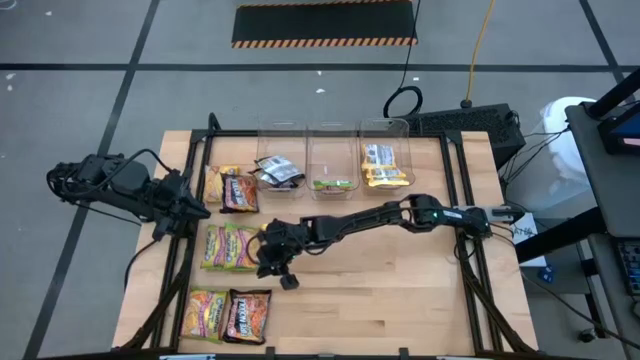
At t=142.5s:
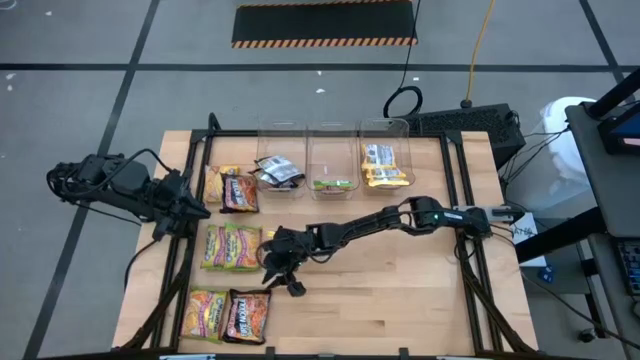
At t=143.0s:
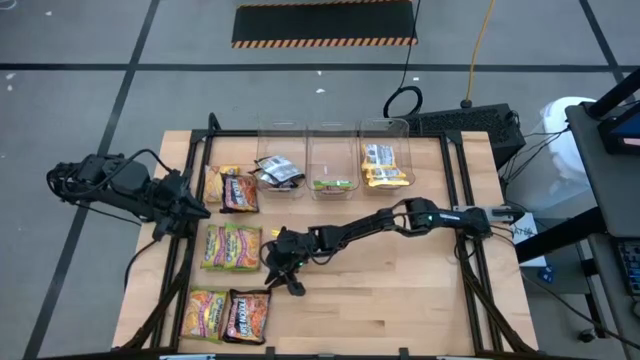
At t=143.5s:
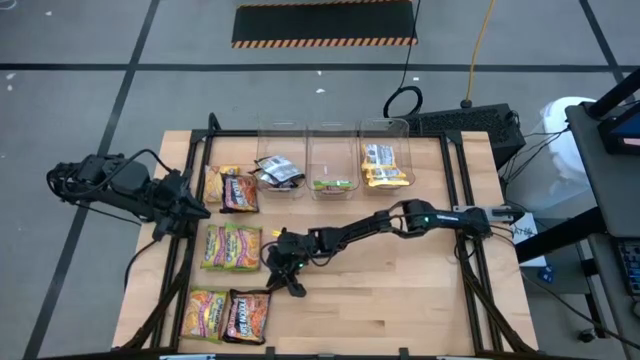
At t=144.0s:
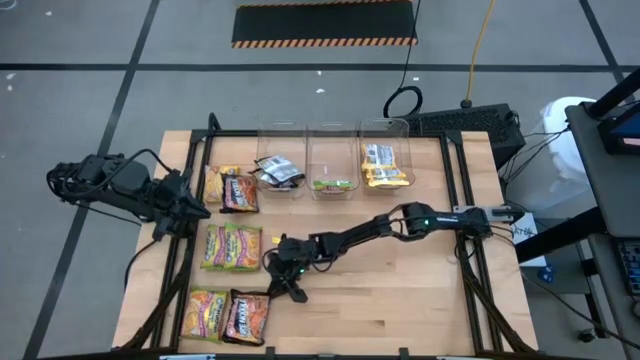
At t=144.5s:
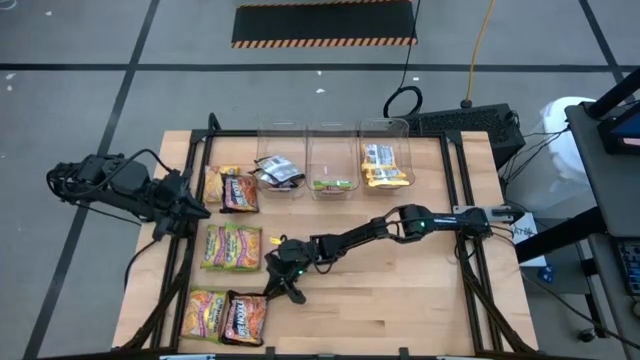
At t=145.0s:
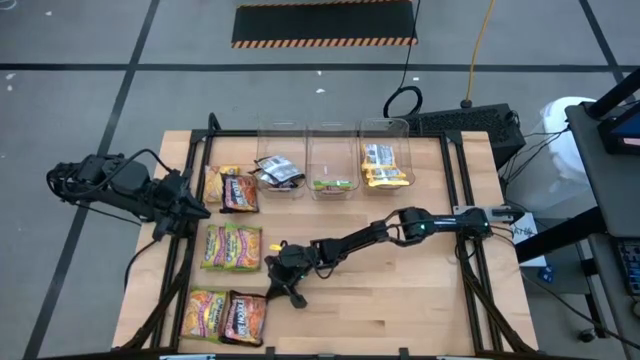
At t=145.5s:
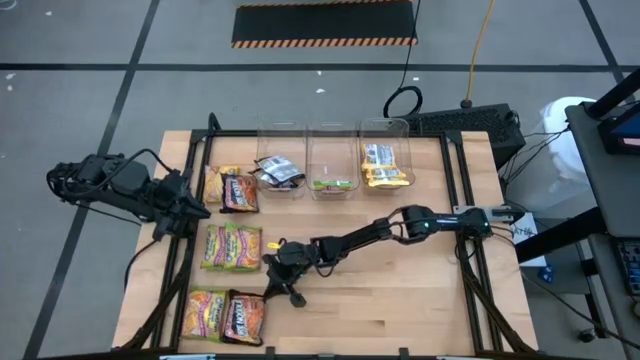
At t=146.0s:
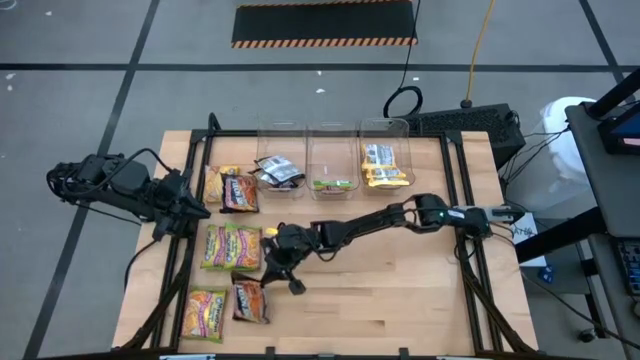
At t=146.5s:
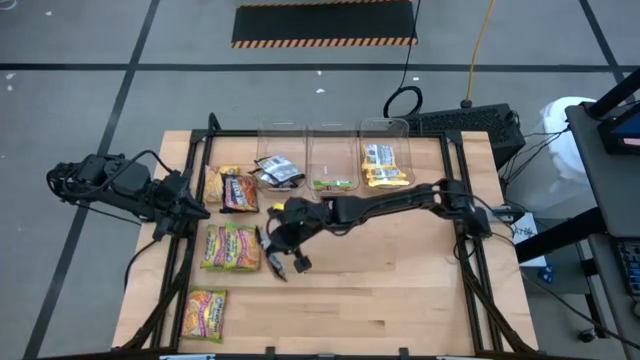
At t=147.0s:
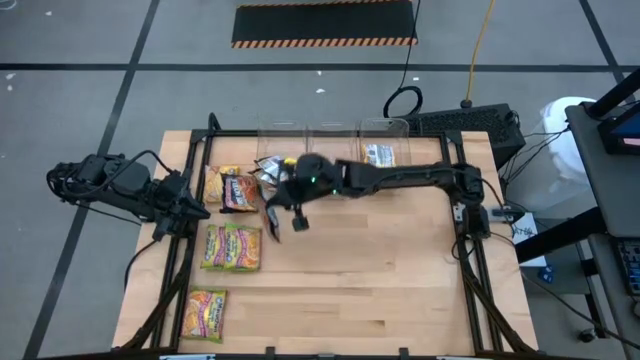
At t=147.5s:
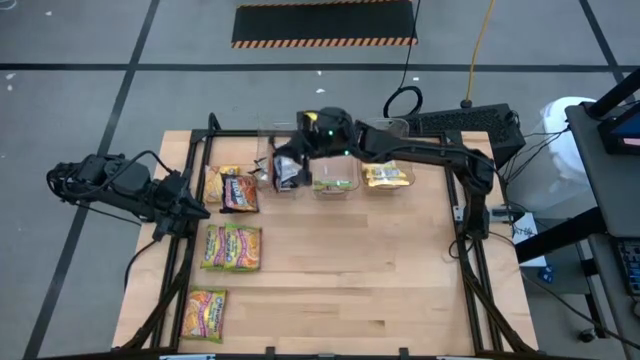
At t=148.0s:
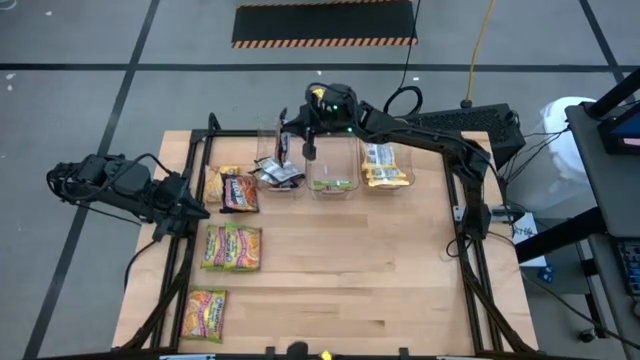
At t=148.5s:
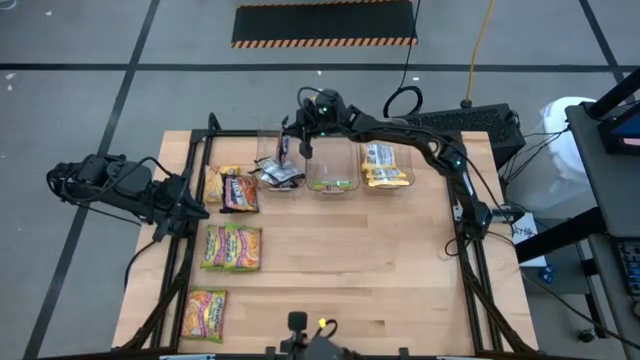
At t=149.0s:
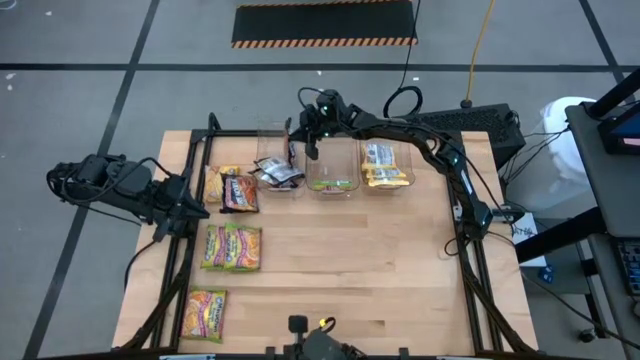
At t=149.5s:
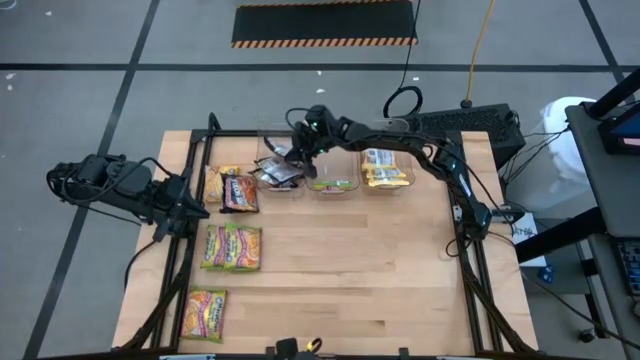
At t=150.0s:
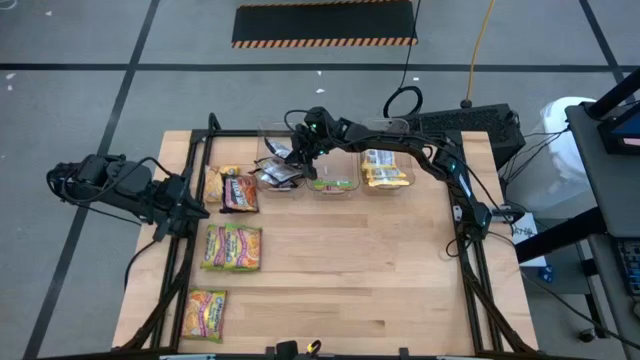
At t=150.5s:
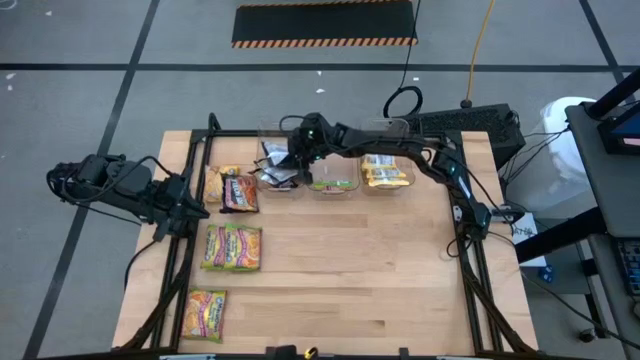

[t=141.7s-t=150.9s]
Task: Sort Maruchan noodles
Put the black noodle pack into the left transparent bin

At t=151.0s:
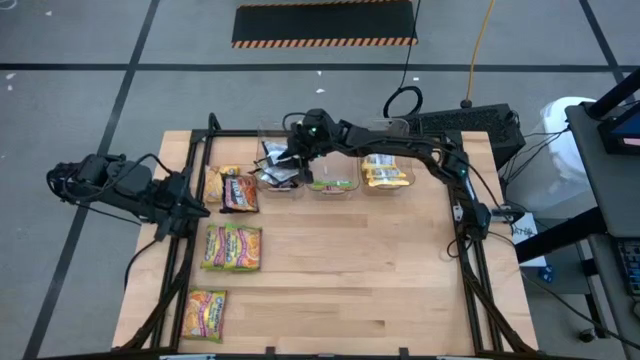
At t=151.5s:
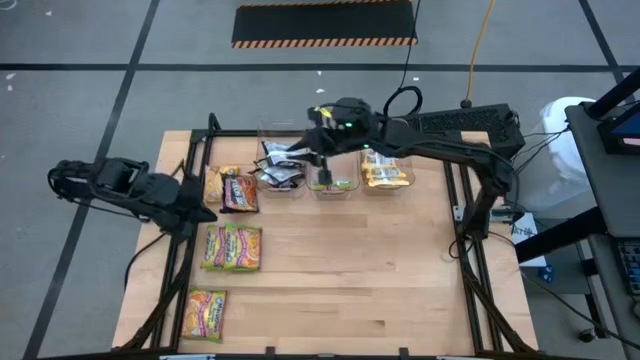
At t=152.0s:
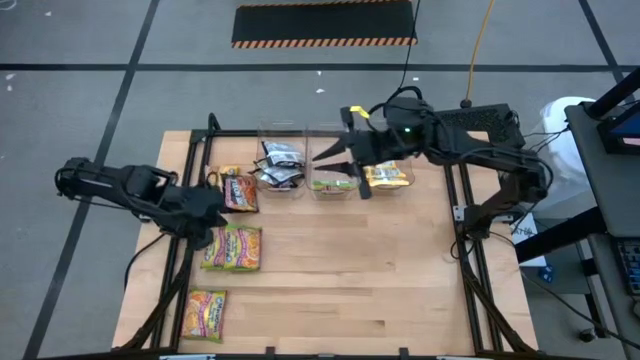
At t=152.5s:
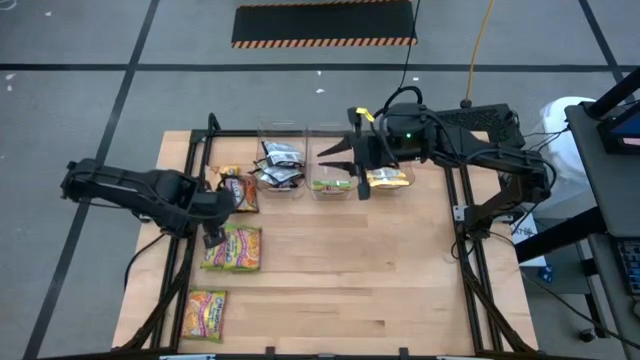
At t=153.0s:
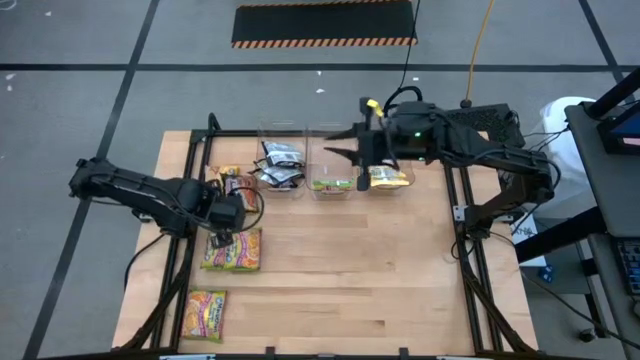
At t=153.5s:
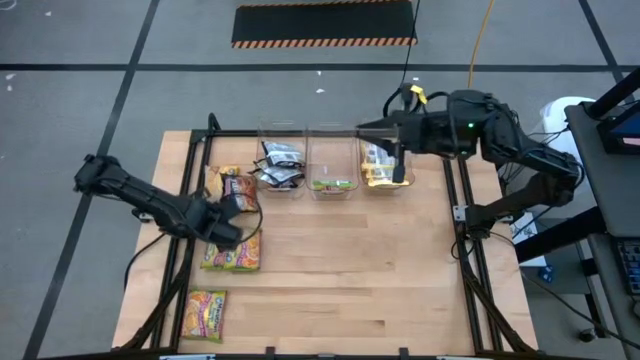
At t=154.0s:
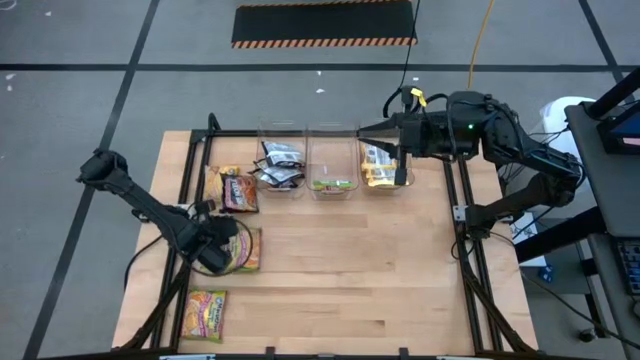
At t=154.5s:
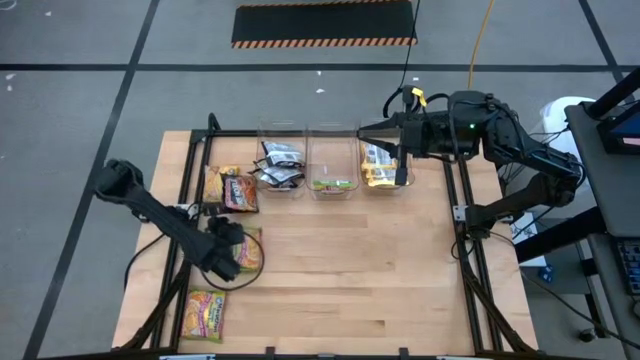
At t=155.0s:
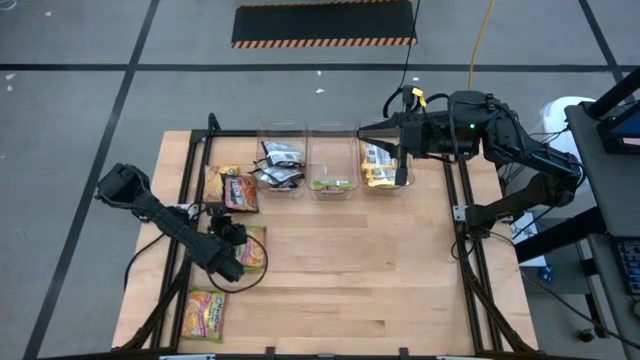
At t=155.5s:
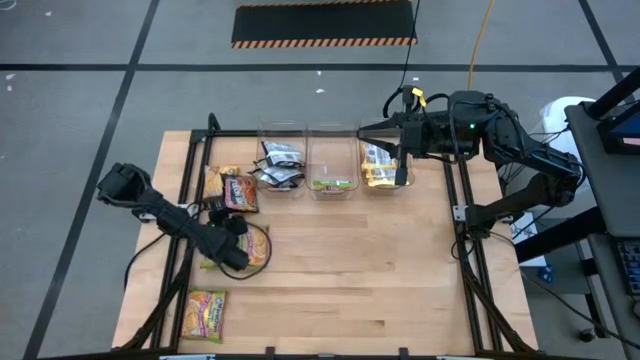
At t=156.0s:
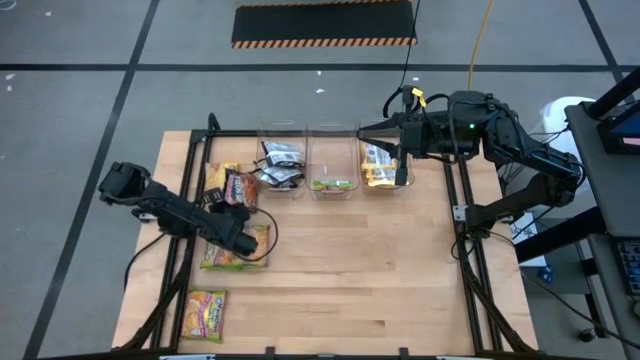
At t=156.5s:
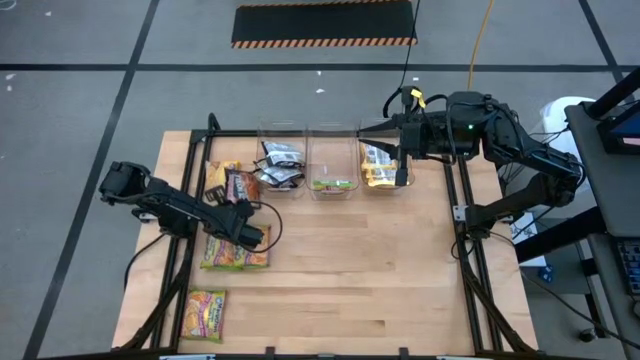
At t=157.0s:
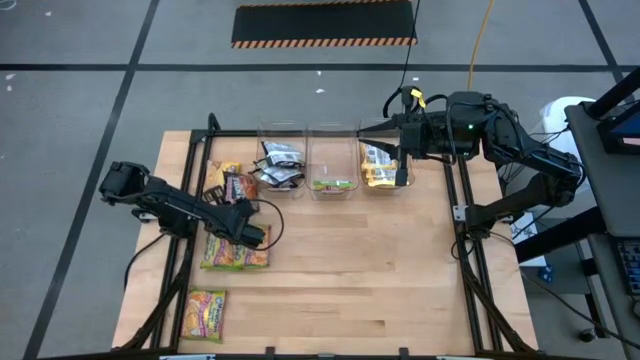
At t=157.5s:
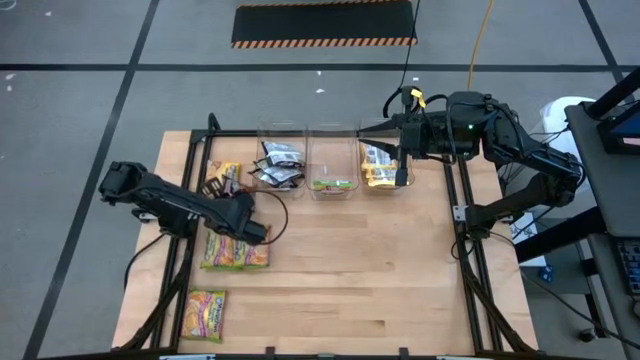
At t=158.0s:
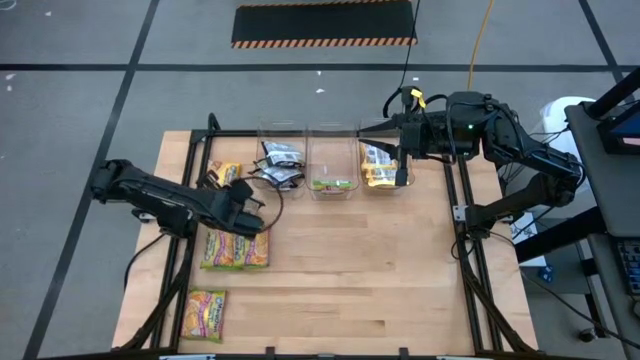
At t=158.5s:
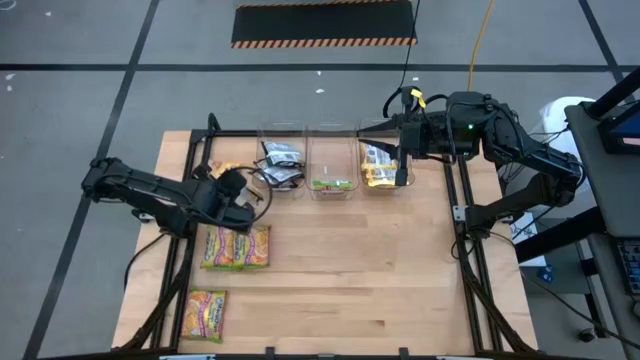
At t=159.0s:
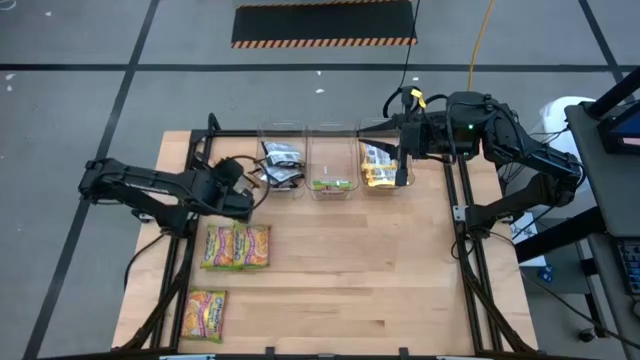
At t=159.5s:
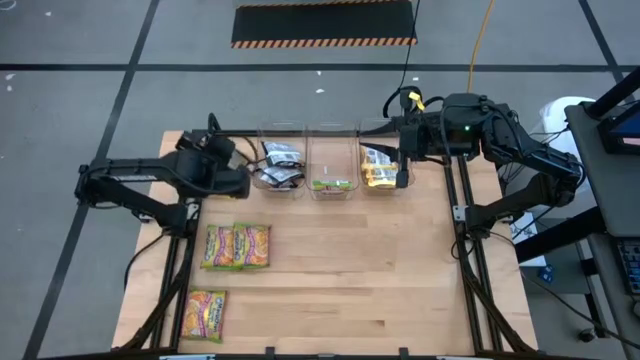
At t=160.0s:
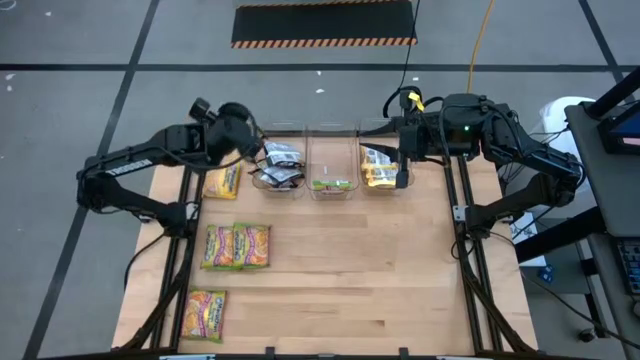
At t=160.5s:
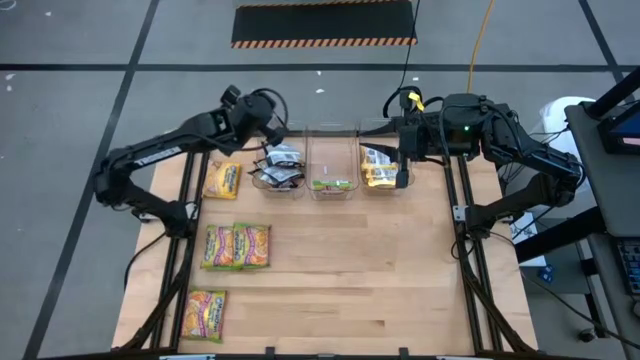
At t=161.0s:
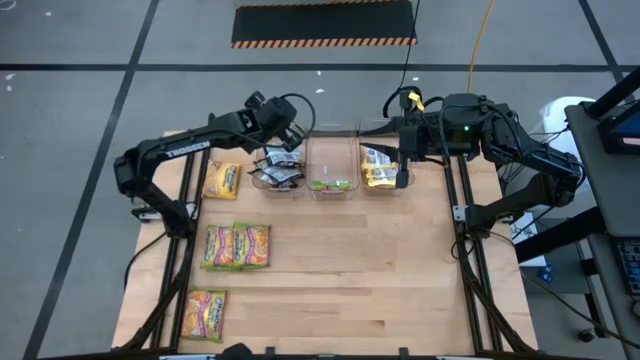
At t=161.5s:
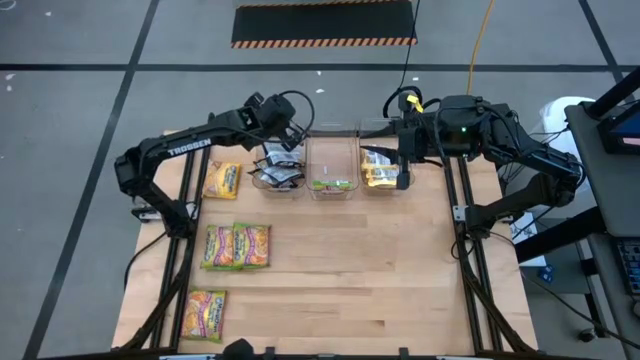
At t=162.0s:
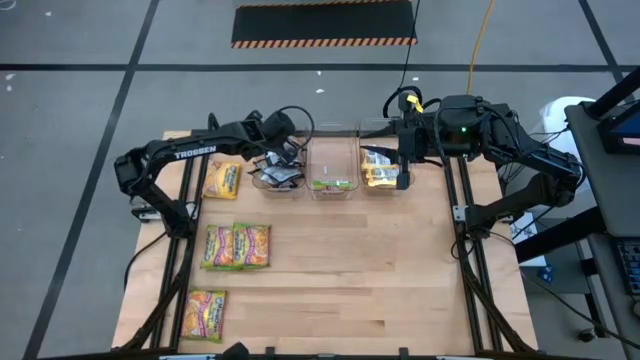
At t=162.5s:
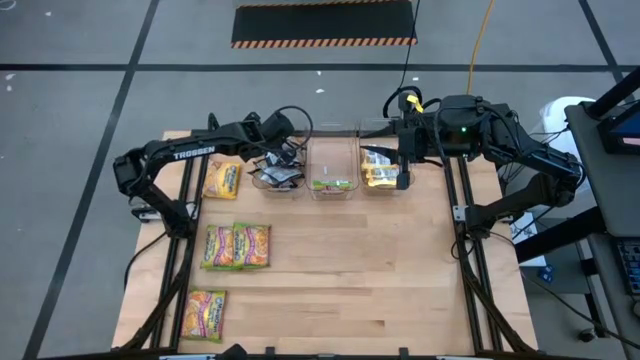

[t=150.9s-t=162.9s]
Put the black noodle pack into the left transparent bin
